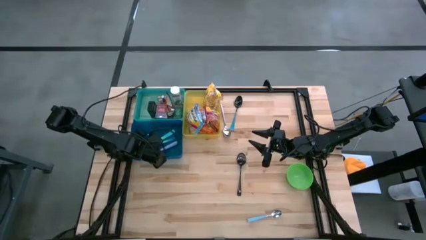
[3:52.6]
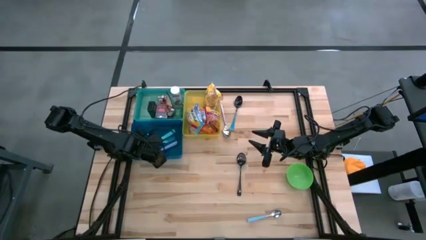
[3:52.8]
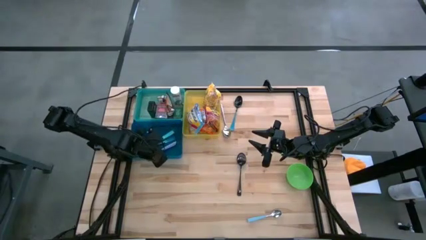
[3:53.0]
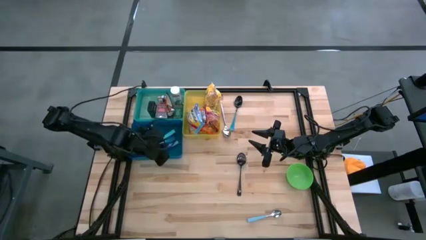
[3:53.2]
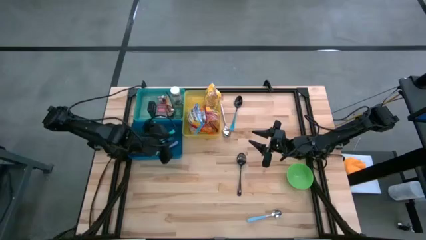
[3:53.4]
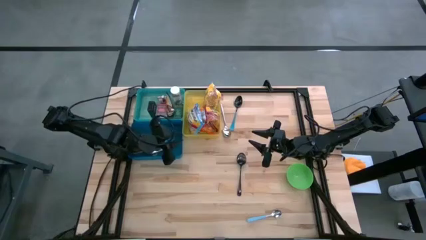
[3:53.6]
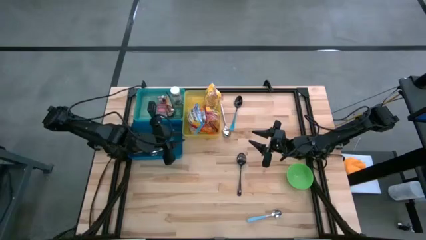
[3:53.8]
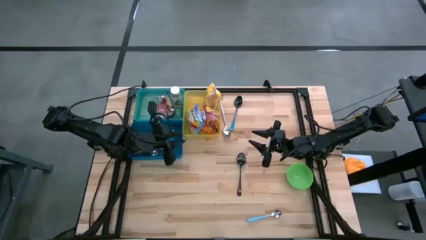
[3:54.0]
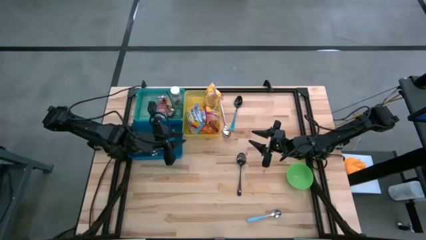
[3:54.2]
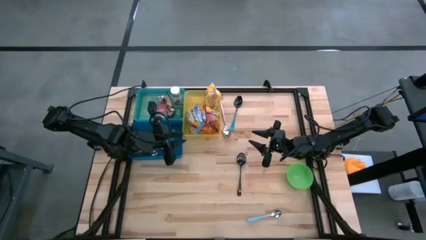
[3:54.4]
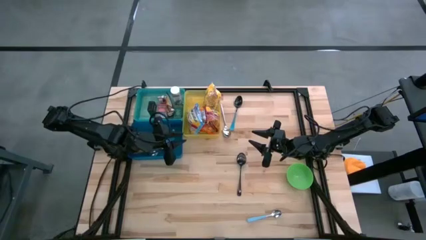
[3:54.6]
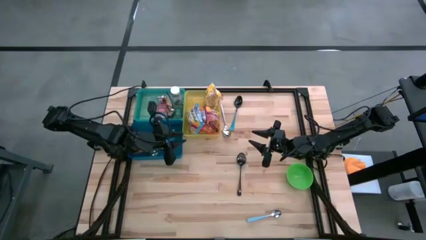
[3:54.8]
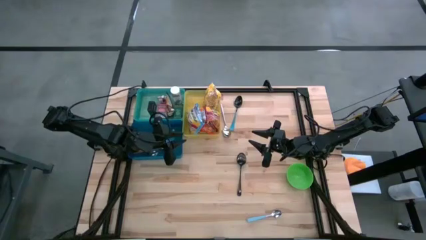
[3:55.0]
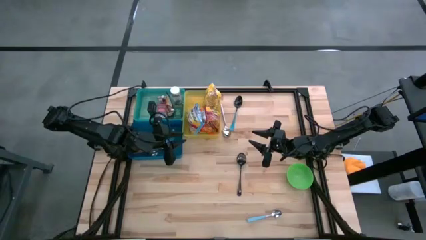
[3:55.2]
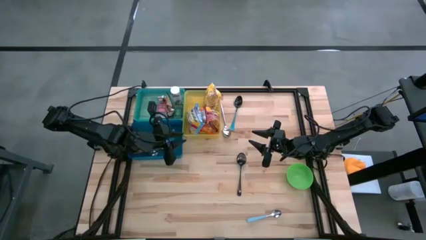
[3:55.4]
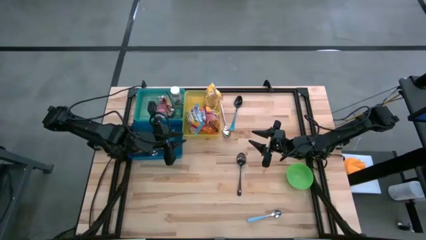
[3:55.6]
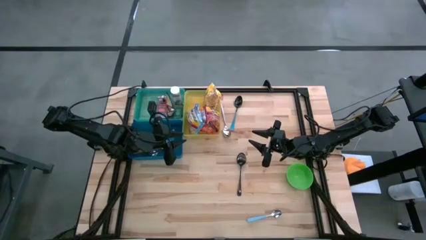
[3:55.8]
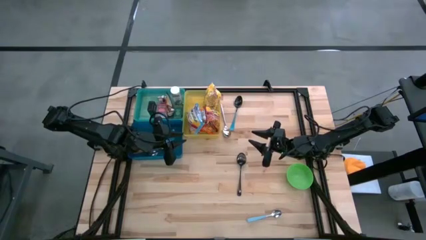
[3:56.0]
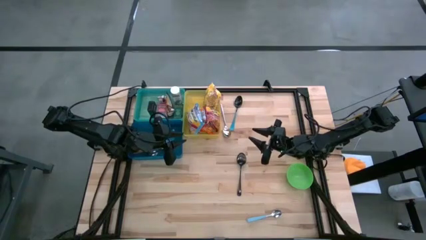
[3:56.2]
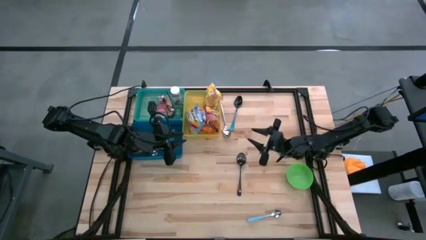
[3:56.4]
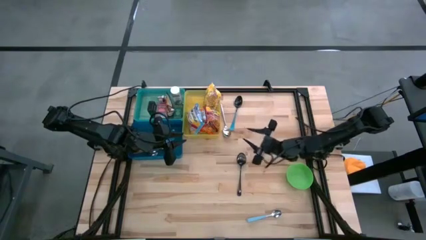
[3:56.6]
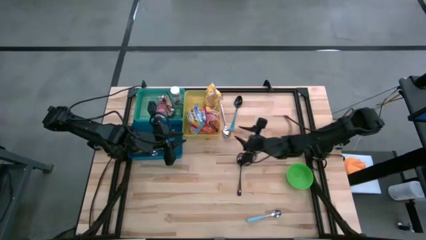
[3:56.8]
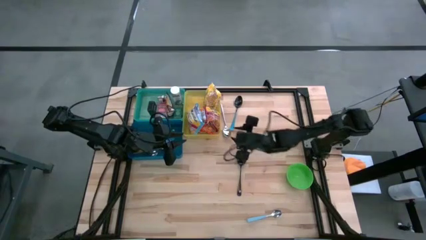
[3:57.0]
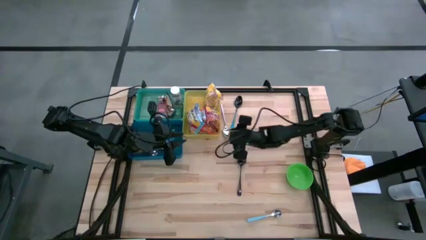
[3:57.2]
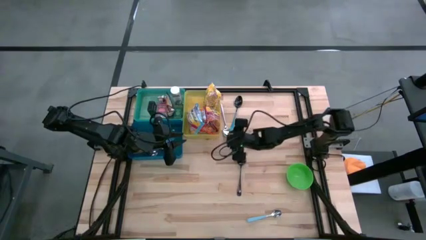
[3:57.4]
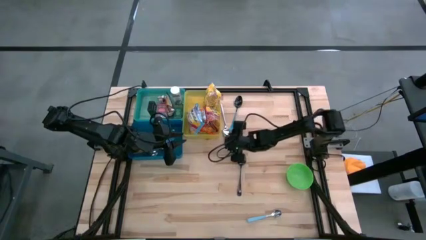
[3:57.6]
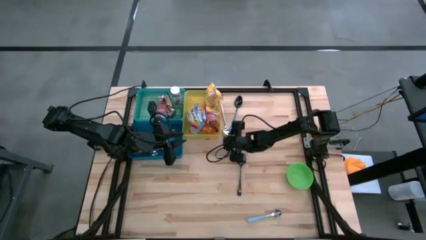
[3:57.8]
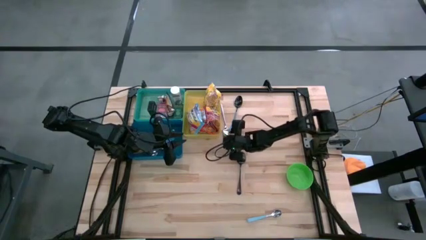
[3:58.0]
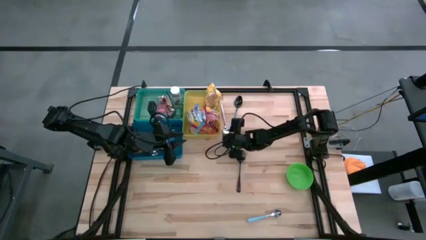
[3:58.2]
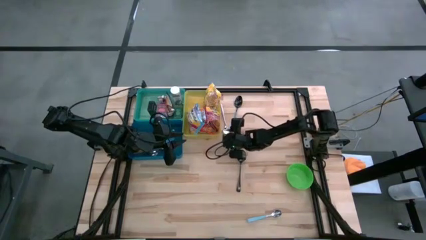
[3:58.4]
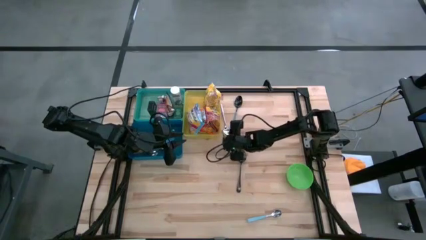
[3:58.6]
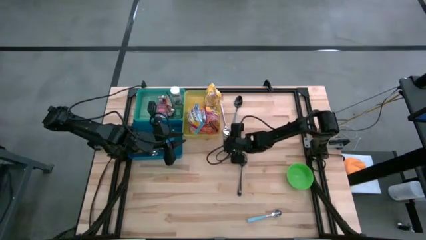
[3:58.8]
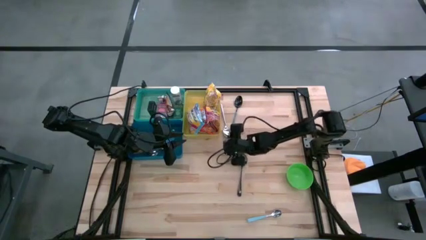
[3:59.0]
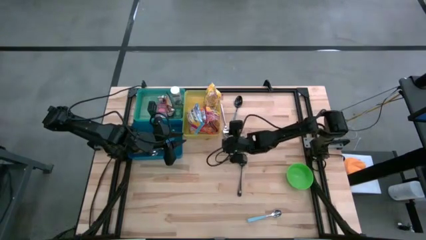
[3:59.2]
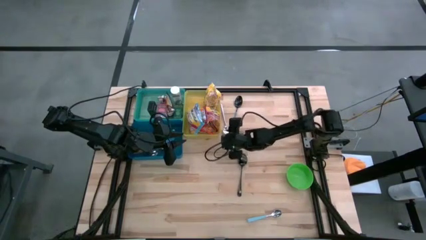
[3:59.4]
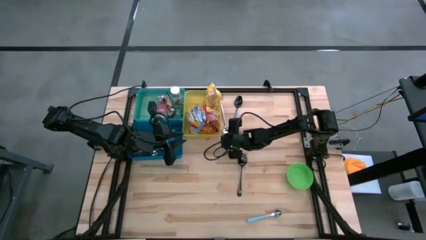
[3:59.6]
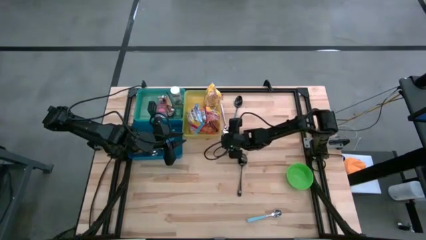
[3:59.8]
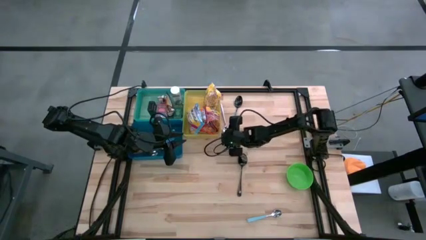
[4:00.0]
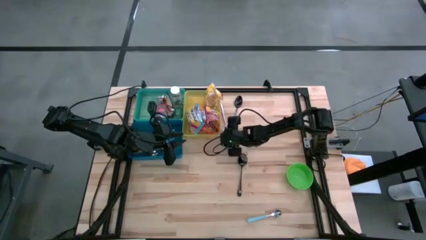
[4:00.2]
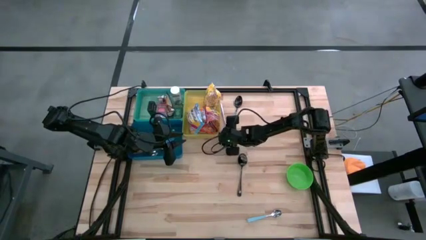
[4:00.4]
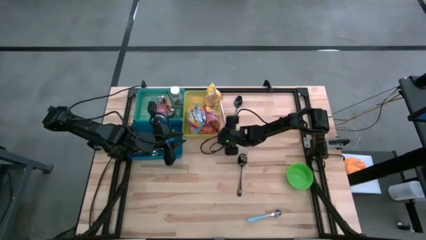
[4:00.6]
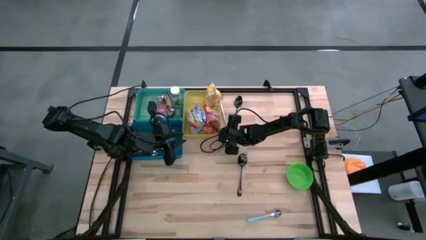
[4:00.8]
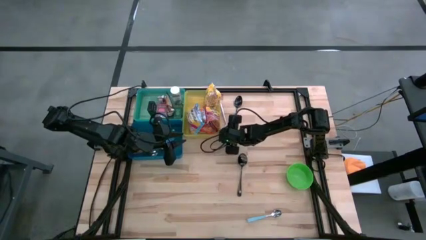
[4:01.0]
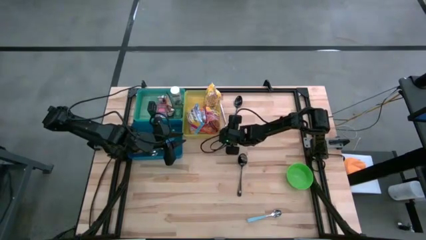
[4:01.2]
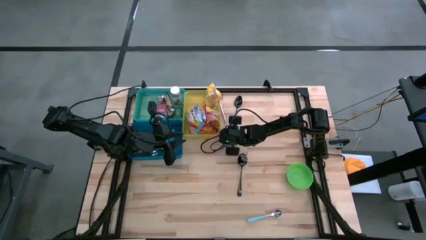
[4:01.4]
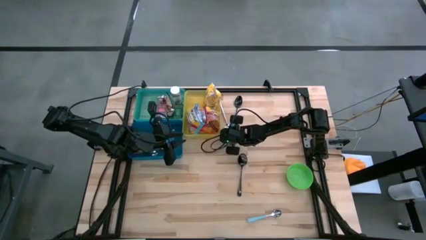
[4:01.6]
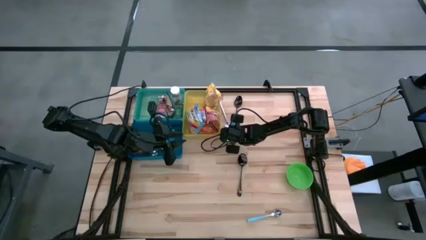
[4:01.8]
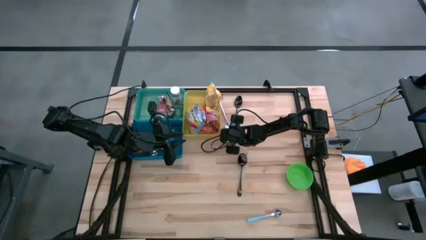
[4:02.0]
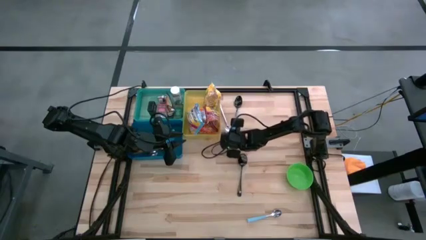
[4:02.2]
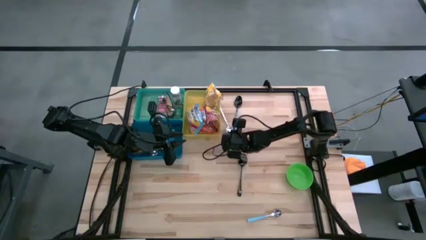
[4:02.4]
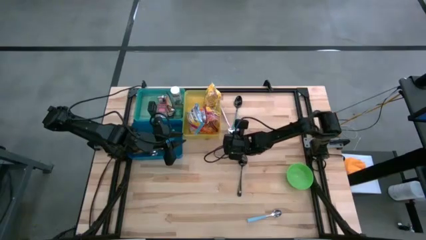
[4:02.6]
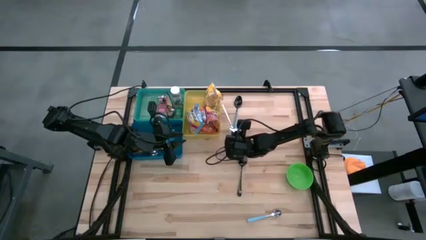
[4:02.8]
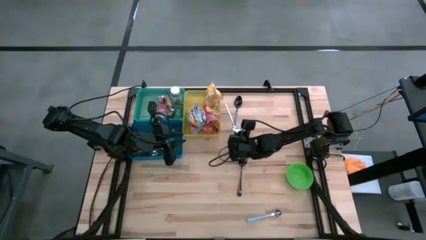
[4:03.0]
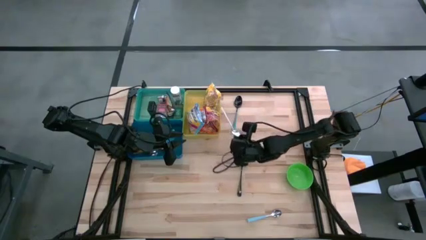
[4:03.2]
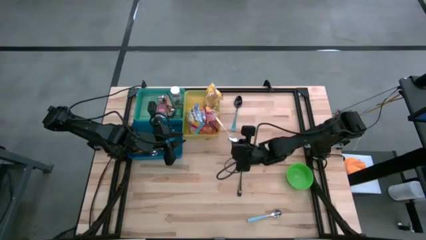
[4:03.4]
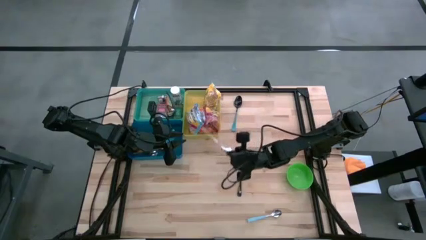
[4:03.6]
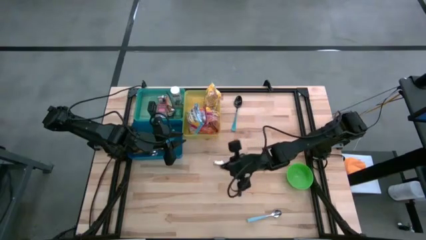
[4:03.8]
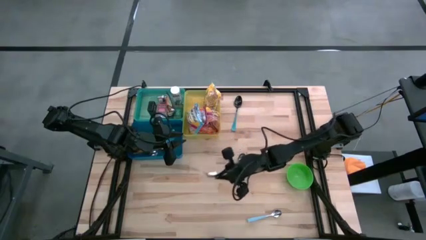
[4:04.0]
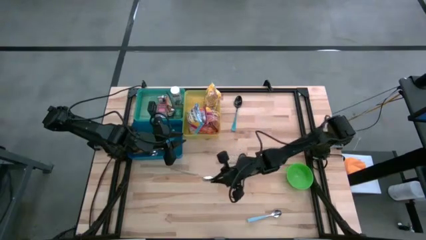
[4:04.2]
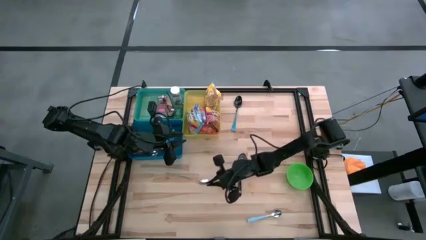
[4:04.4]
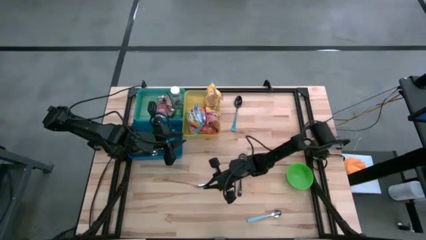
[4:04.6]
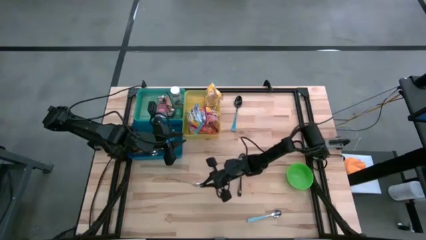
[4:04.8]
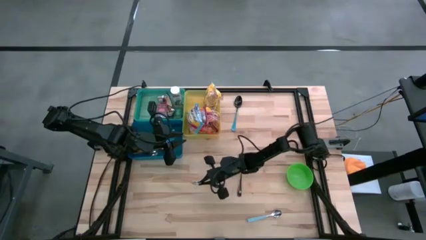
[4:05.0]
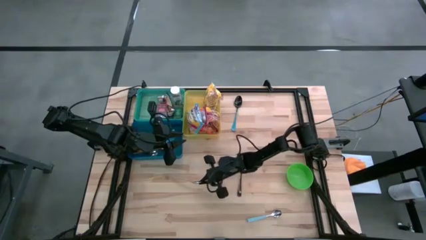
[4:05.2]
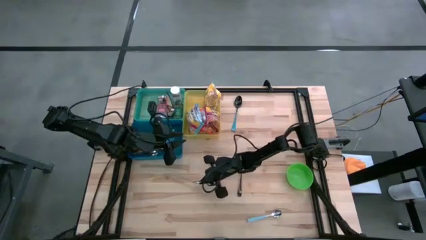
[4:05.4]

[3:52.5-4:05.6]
Put the silver spoon into the blue bin
